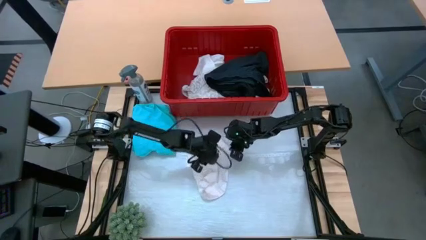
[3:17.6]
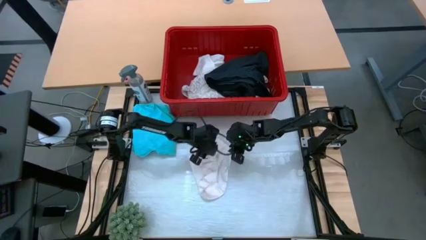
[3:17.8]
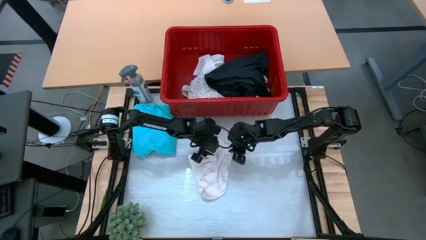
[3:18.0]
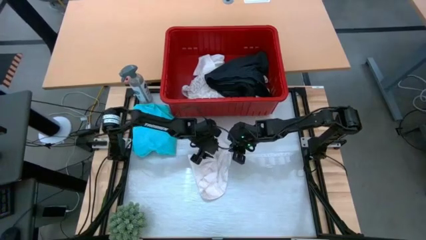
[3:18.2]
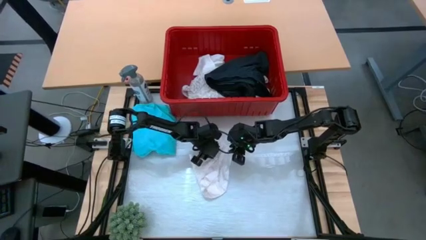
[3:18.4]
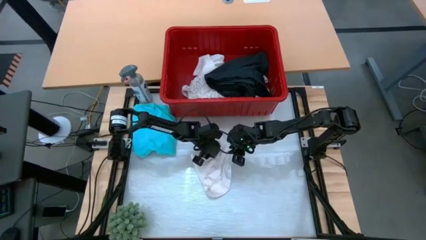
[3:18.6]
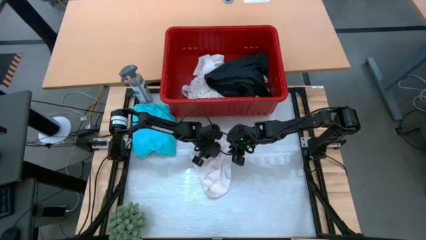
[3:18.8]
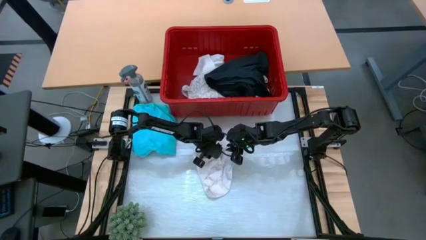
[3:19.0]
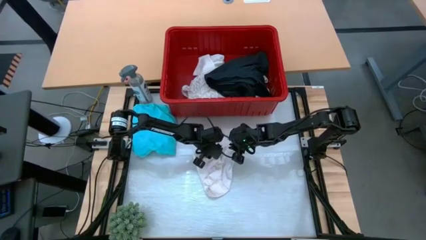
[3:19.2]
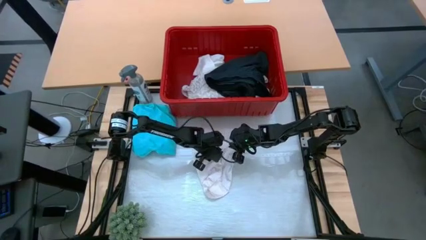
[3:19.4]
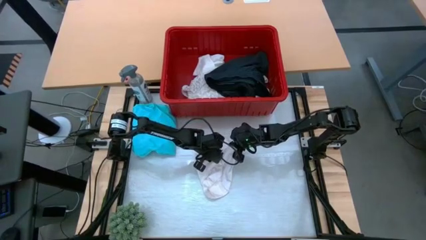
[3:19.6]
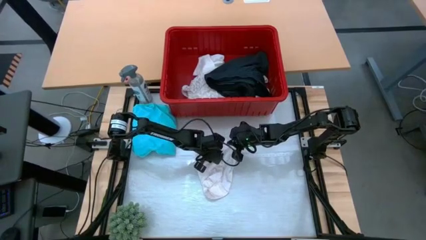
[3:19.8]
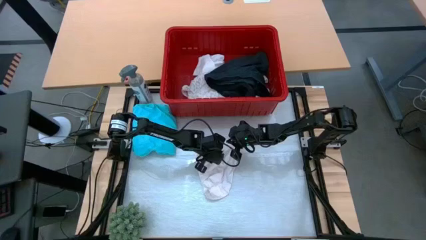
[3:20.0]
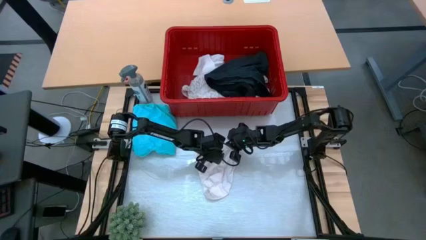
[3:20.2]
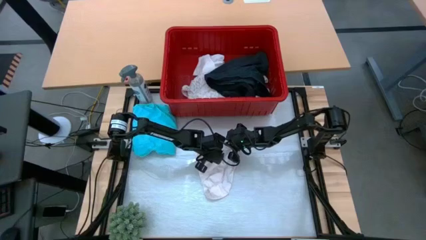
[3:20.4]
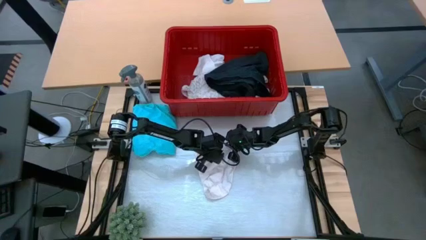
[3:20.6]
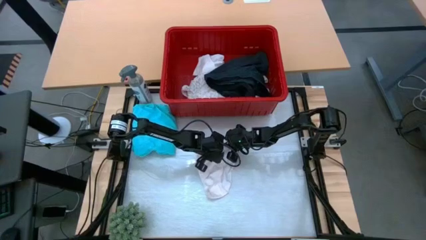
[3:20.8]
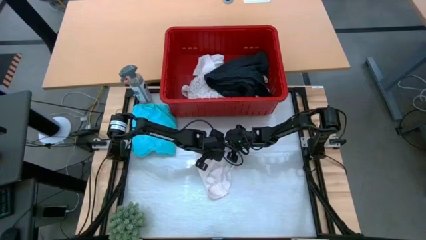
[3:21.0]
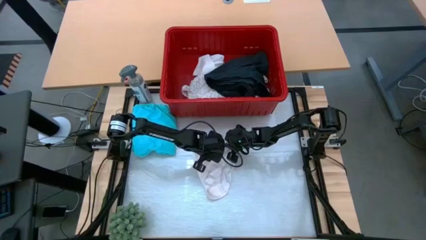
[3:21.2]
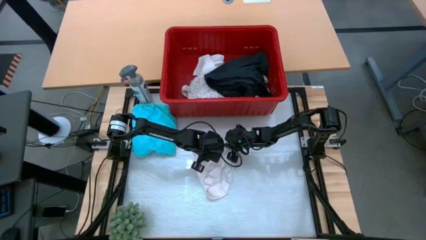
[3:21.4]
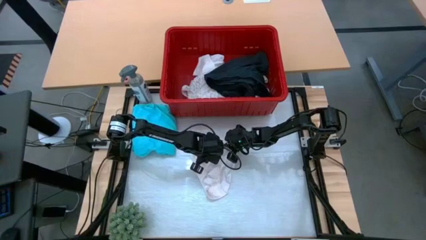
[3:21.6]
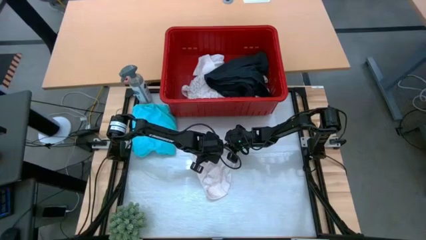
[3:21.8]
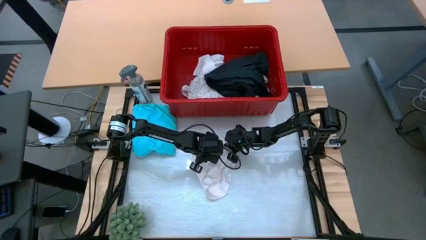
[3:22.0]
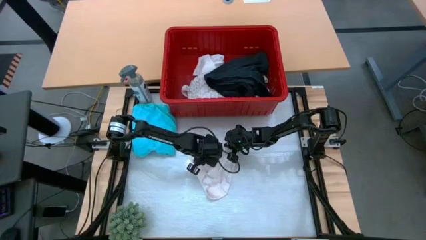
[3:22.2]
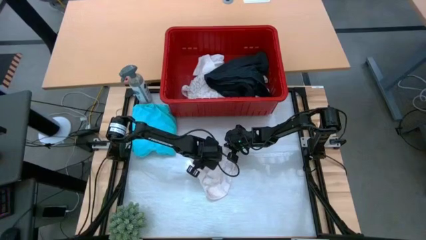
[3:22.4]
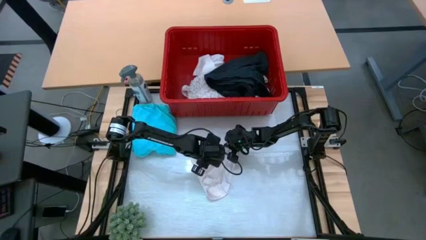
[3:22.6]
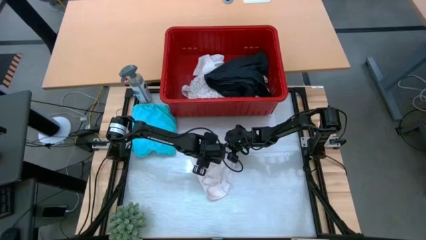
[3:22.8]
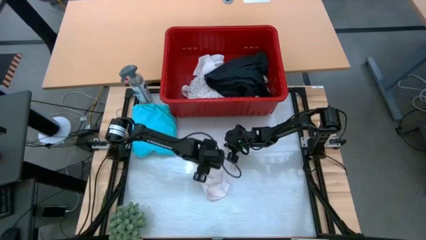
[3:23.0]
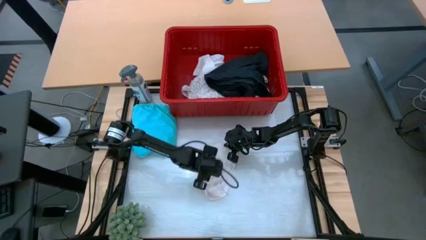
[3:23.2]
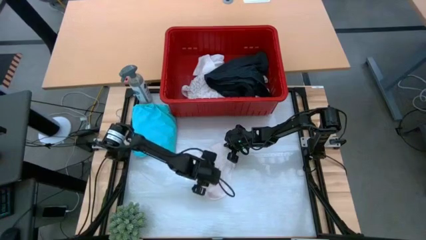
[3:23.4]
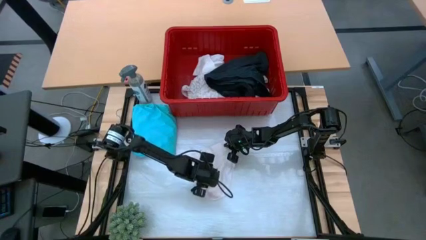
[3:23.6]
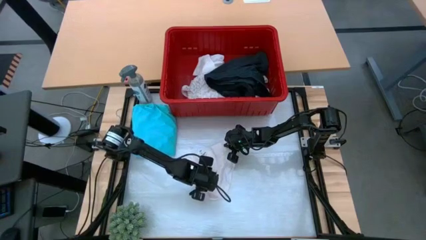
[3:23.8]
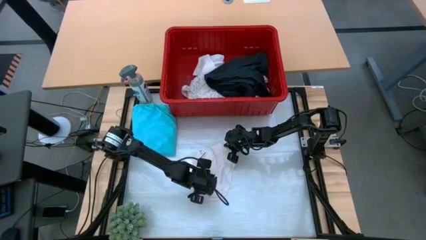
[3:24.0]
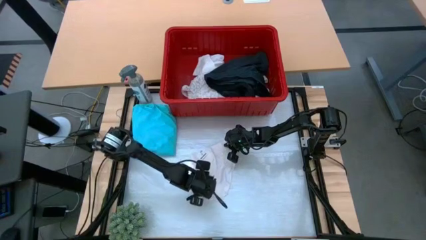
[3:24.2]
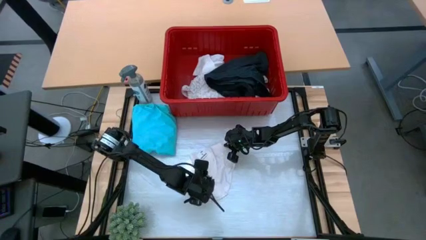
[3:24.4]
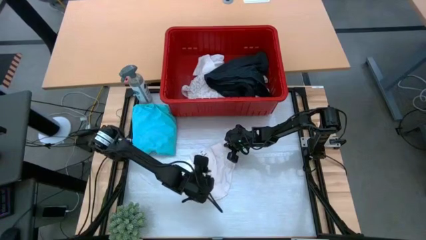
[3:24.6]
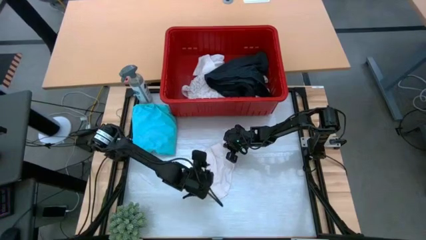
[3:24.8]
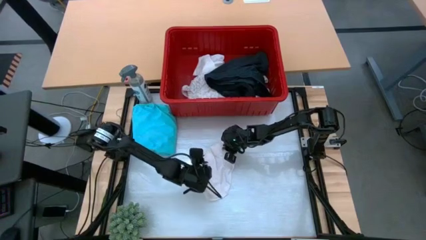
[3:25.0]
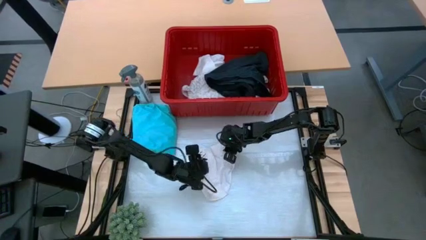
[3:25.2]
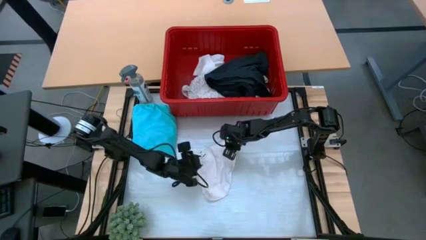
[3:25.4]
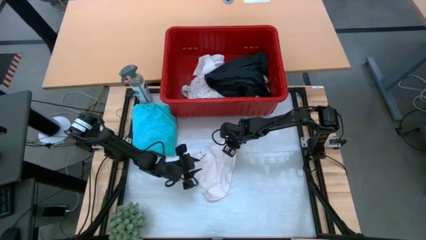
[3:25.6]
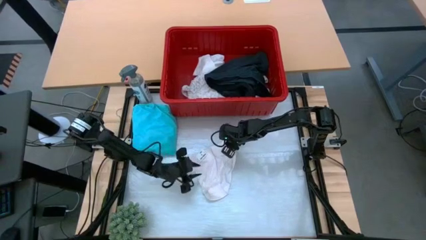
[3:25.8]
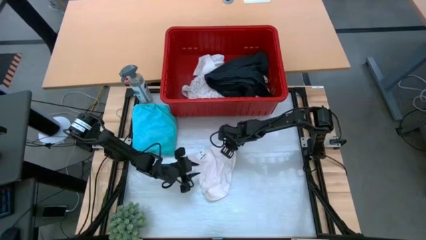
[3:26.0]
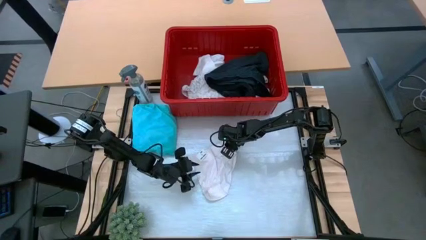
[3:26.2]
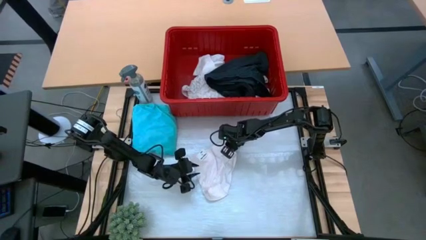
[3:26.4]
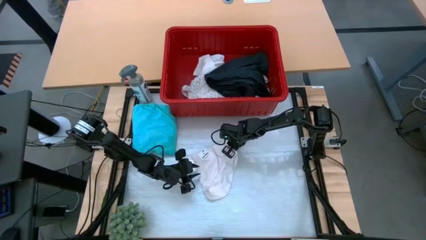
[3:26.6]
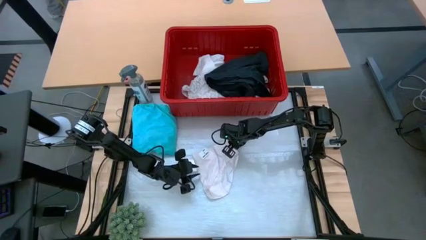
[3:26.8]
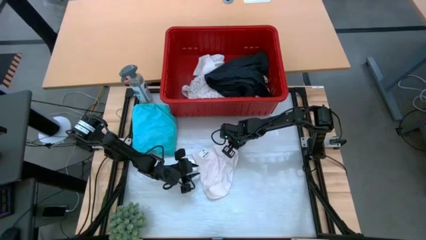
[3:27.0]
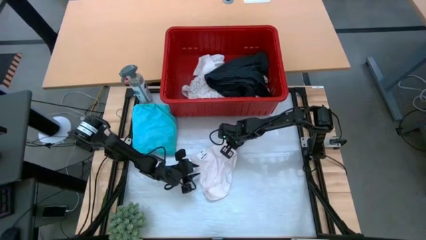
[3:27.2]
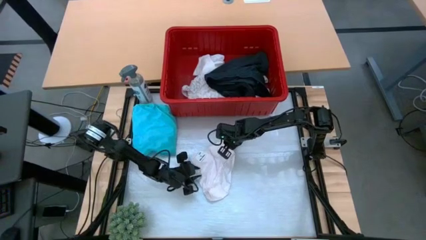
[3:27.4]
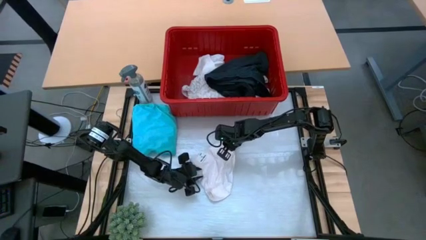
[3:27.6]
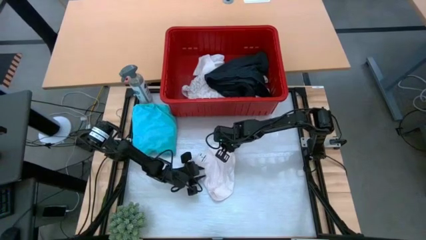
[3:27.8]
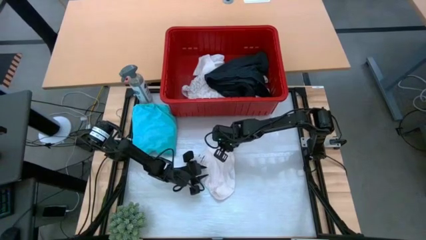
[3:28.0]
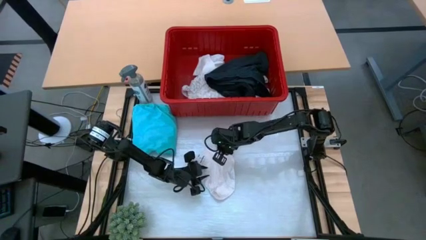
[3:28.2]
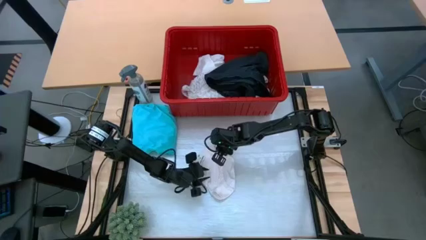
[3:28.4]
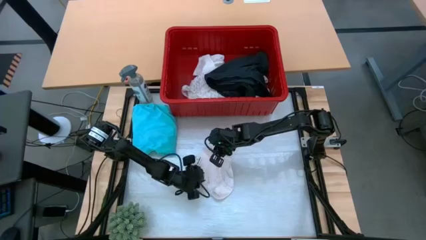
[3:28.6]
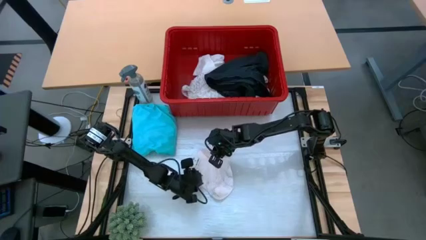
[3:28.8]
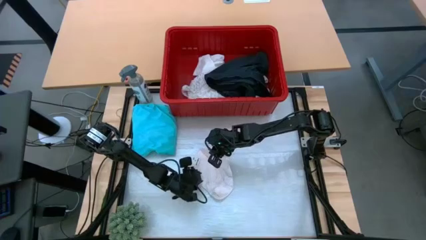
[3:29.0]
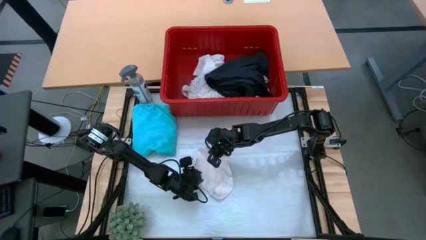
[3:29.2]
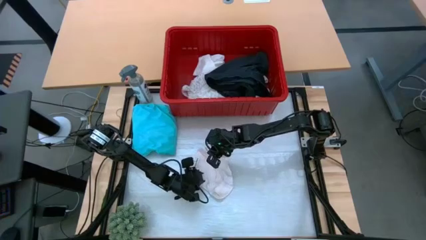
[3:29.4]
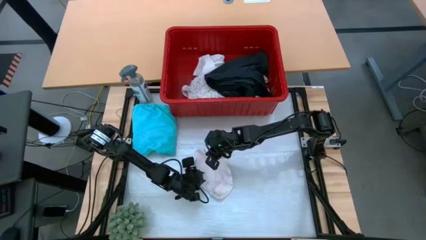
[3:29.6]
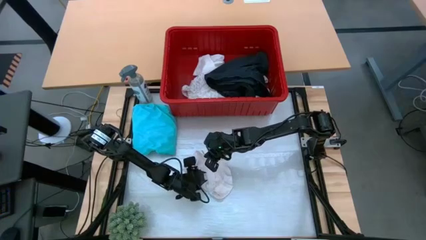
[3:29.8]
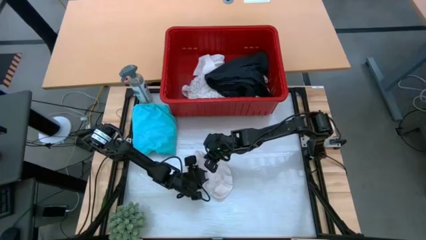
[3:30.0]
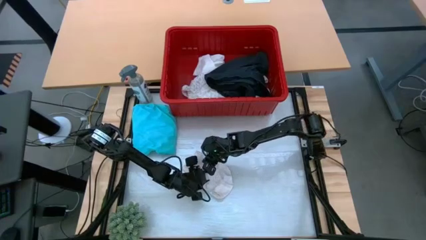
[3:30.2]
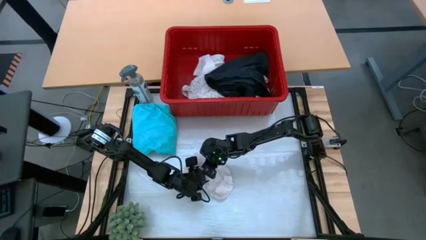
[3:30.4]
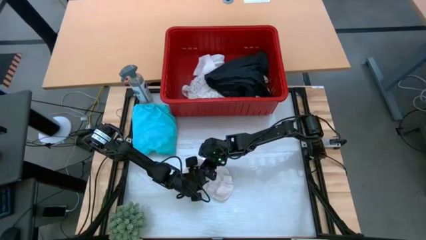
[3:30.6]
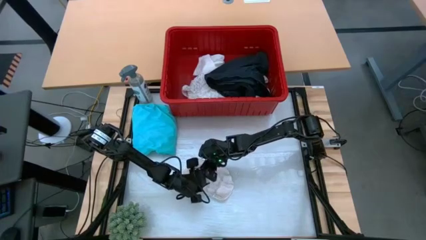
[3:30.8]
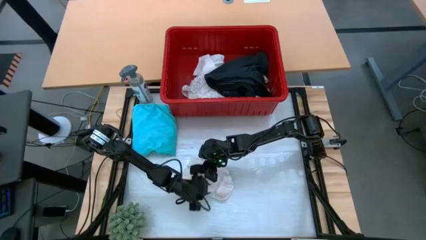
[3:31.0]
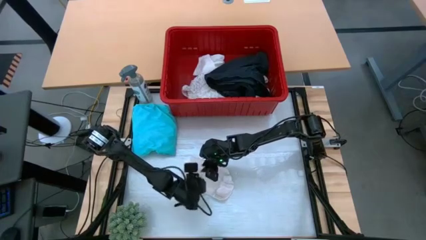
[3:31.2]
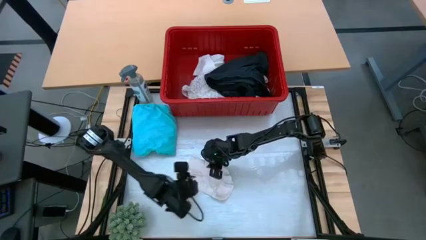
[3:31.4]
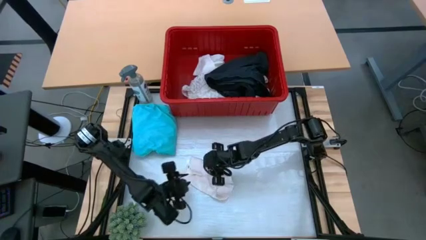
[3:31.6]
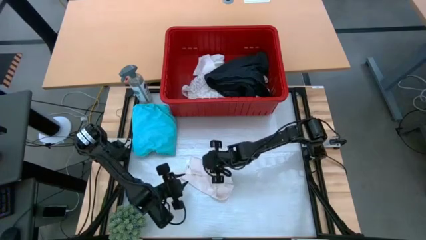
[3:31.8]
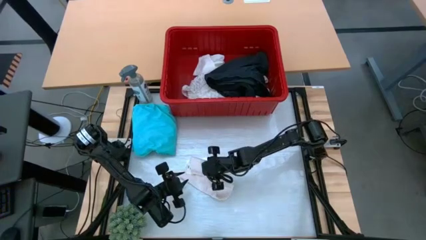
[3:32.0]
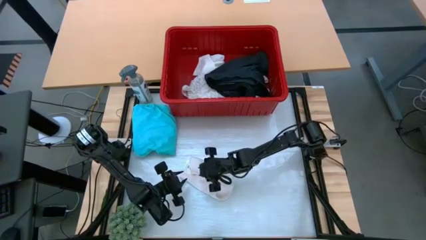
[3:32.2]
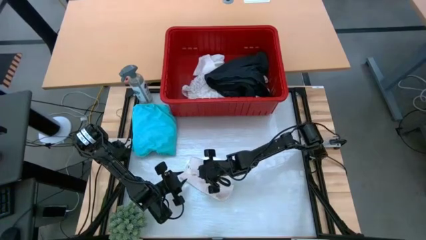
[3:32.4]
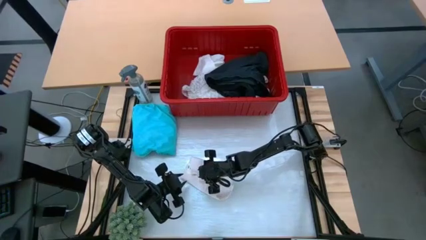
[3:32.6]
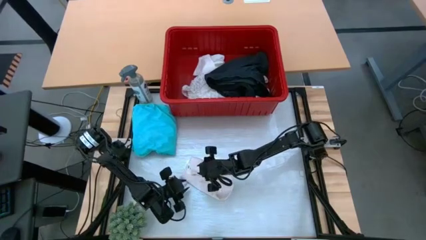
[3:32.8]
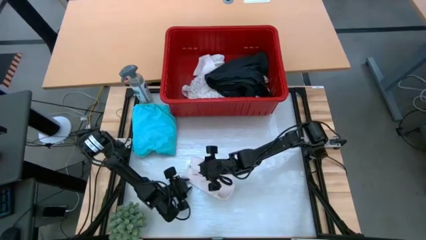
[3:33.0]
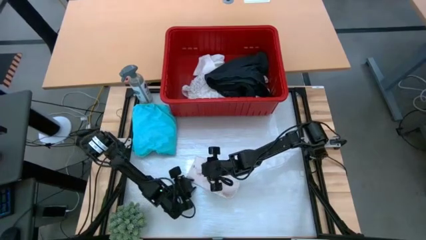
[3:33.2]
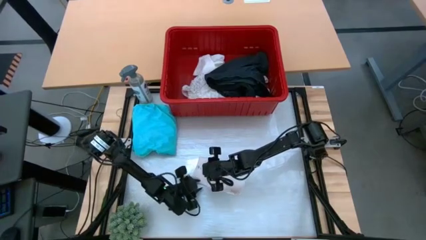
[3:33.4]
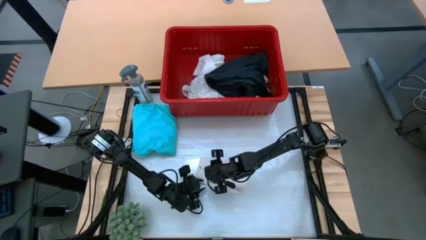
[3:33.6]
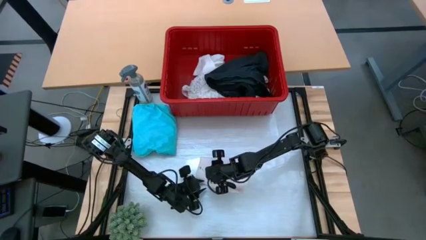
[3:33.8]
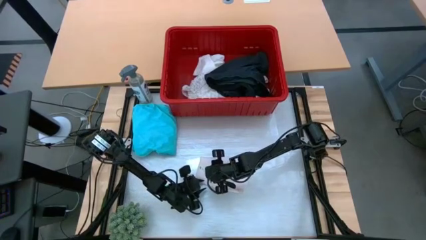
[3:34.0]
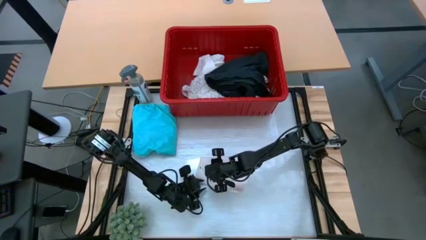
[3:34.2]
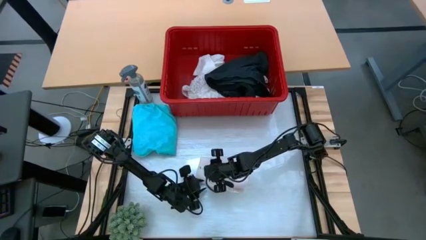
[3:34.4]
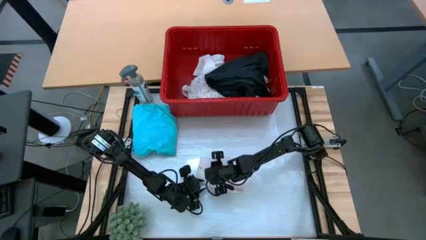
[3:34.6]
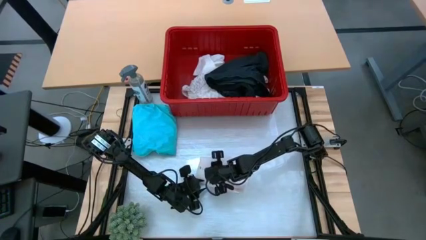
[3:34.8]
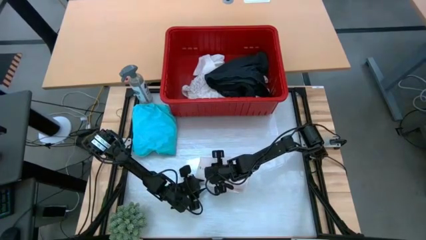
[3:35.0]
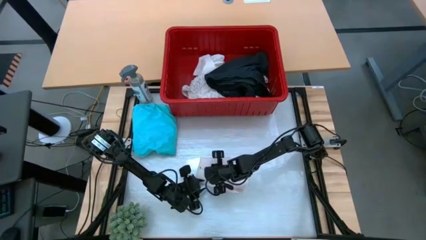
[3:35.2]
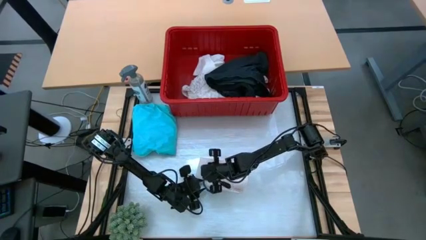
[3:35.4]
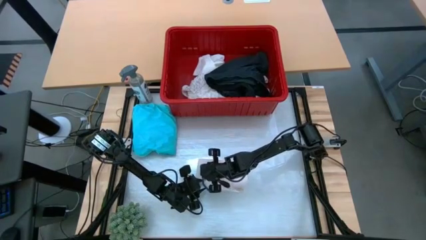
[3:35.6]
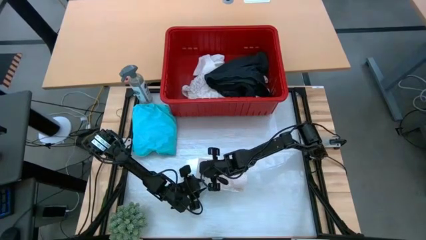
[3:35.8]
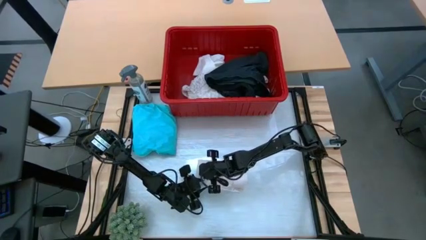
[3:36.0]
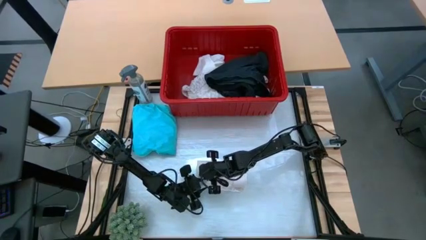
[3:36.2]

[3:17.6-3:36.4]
Task: Fold laundry
Fold the white underwear
